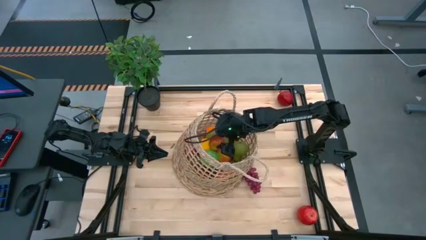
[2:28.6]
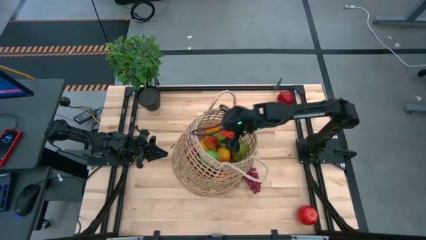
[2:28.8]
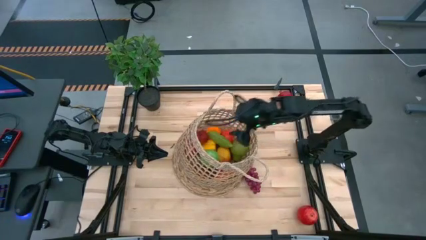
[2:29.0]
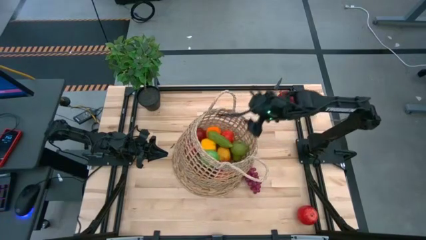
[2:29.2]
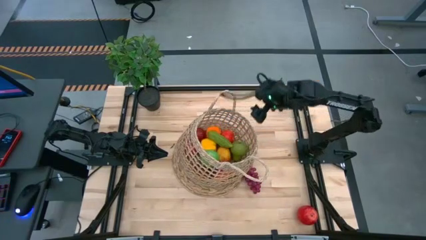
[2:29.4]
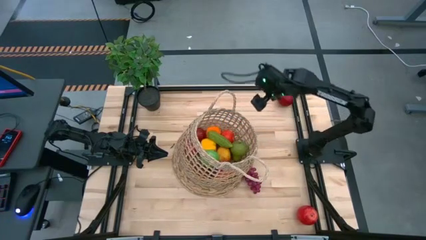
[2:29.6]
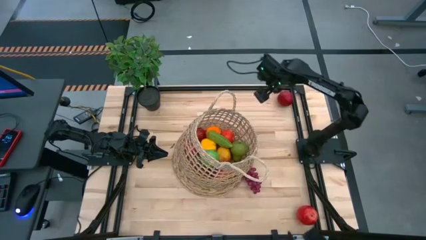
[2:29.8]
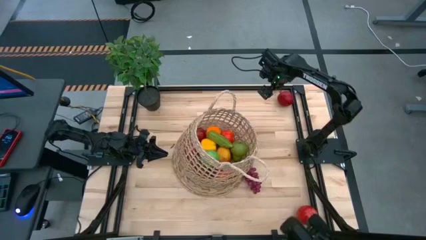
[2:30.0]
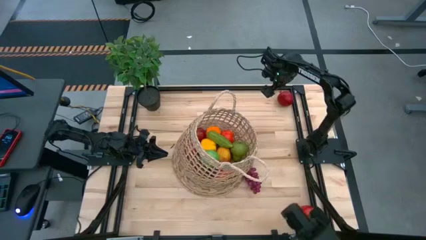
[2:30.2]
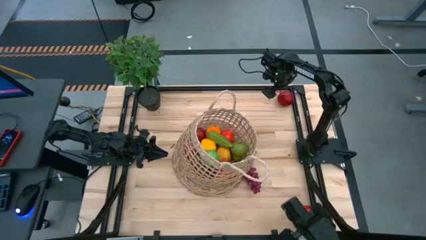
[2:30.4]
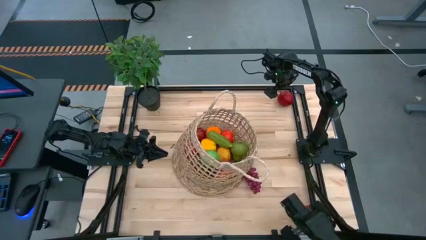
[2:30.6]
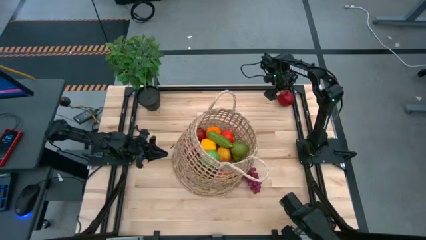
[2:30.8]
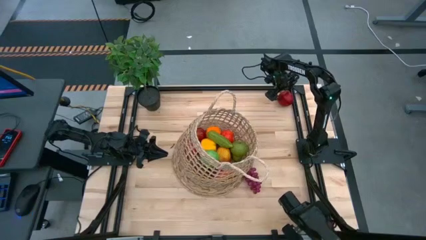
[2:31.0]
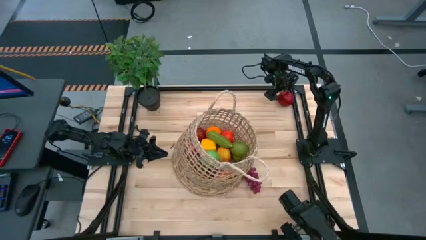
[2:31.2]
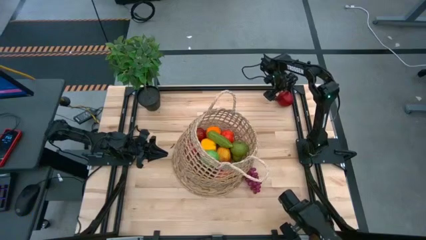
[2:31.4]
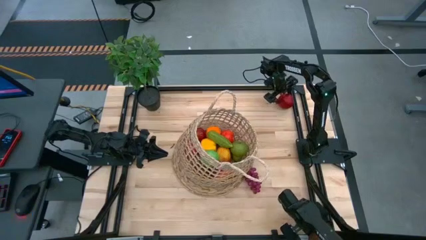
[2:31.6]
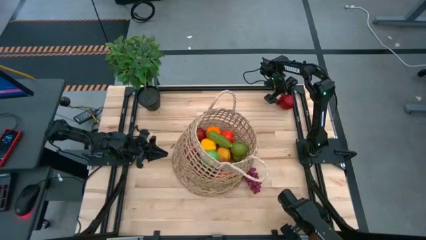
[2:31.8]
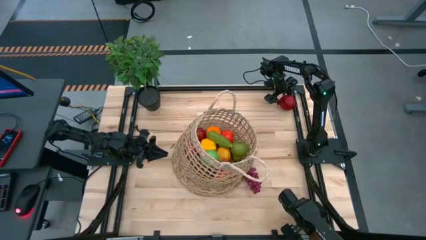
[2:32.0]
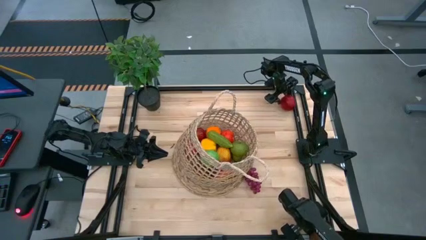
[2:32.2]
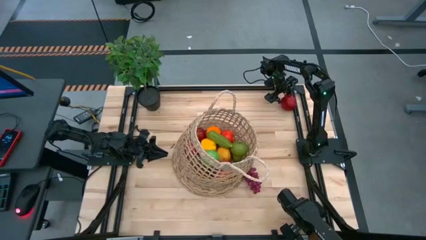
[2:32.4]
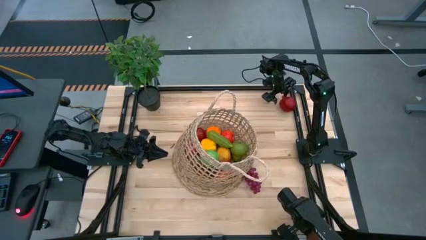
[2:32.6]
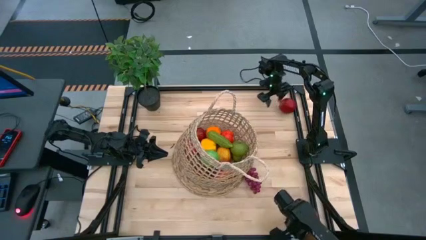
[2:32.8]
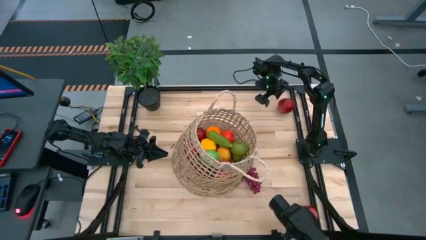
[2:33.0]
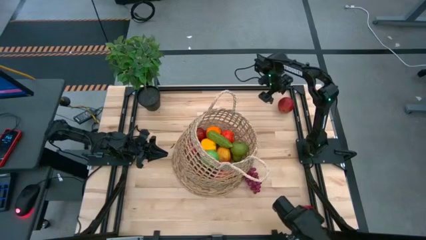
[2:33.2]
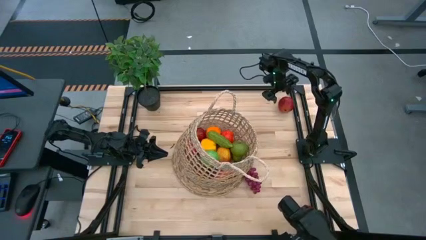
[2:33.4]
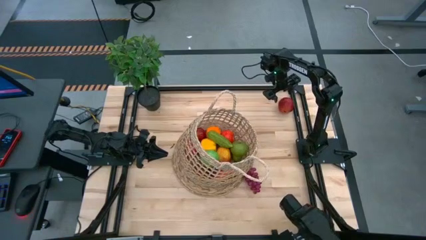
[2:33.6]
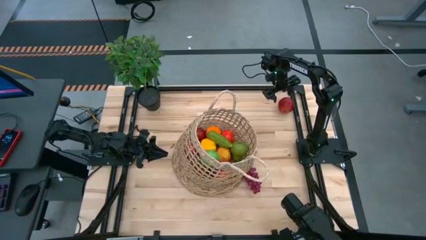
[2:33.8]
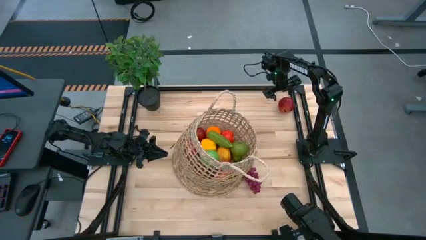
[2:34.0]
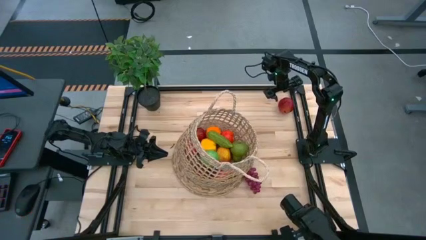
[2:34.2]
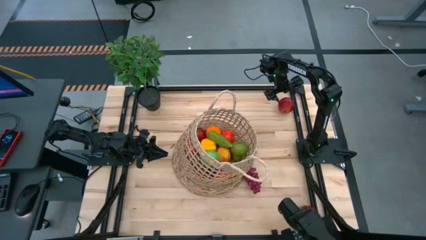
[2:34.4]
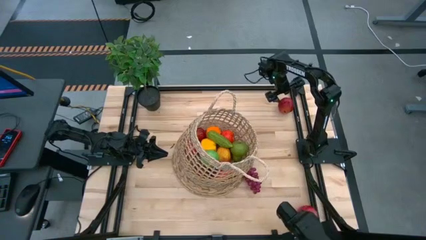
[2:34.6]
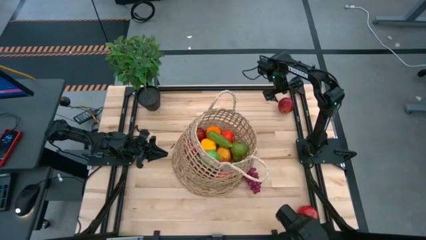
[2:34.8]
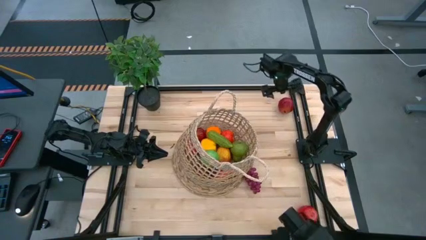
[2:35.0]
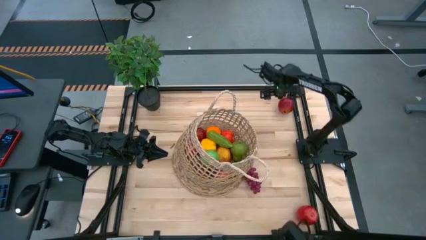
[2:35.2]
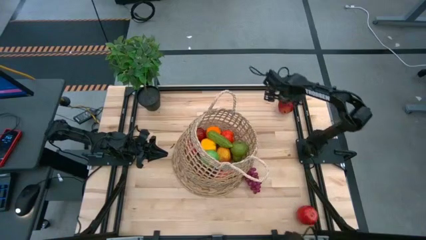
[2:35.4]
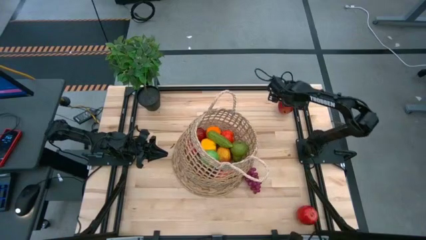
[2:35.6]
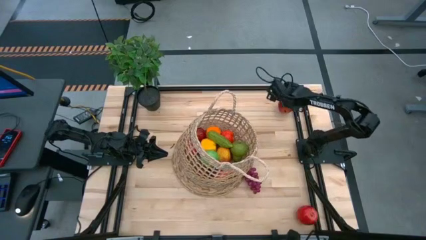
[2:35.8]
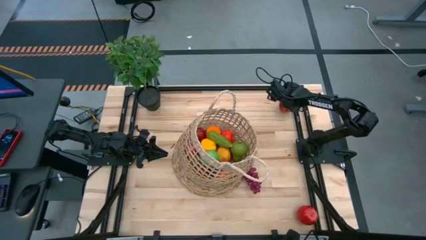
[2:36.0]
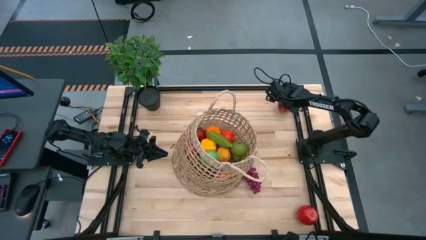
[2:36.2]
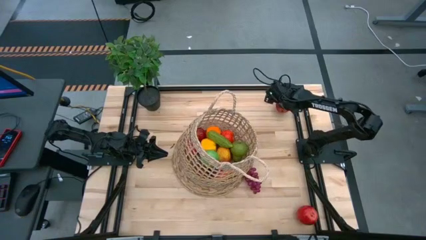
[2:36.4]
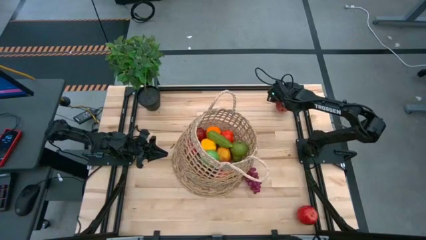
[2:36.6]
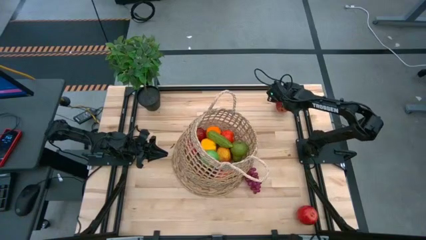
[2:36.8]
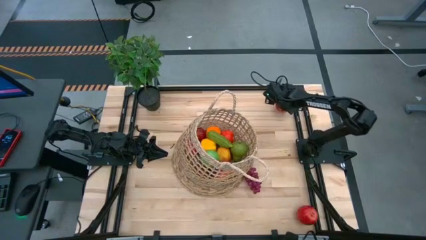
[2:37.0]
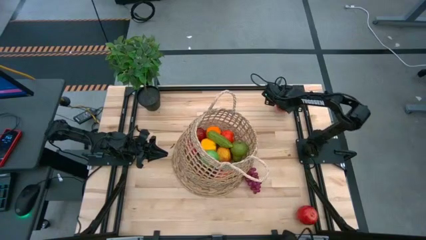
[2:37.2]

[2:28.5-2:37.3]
Task: Build produce basket
Put the red pomegranate into the brown basket

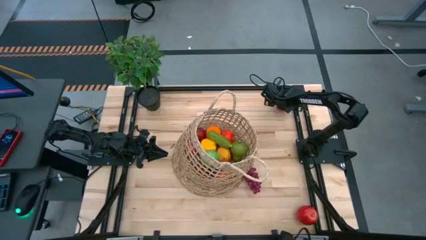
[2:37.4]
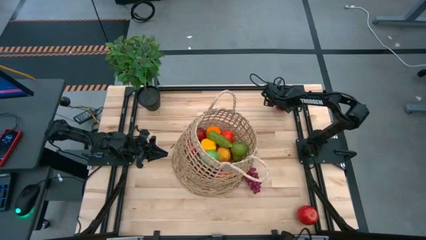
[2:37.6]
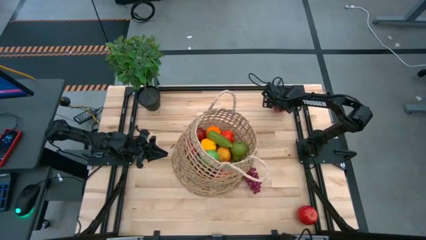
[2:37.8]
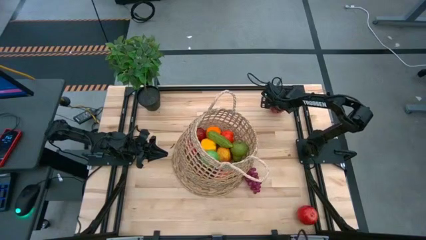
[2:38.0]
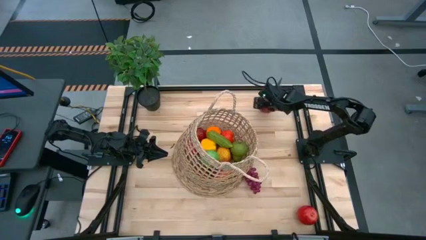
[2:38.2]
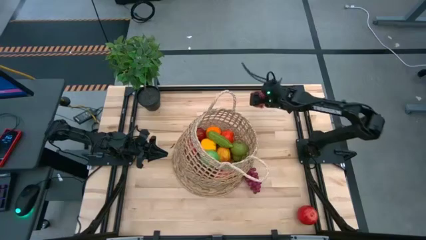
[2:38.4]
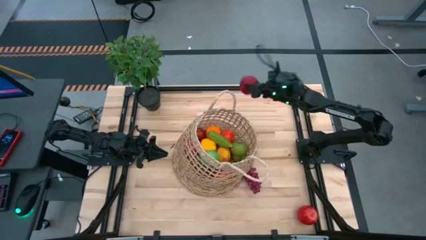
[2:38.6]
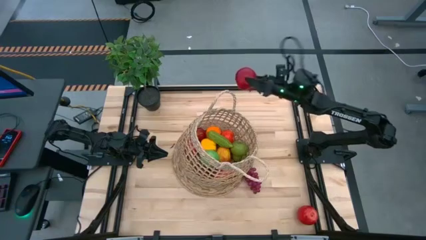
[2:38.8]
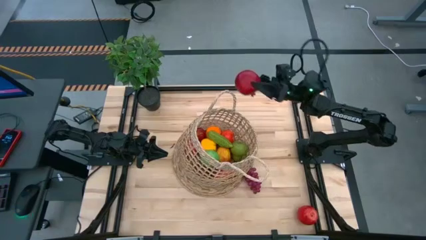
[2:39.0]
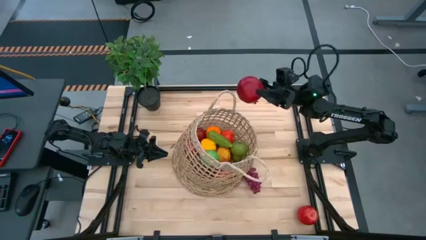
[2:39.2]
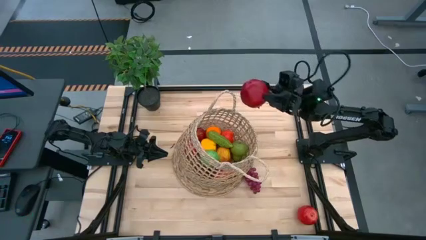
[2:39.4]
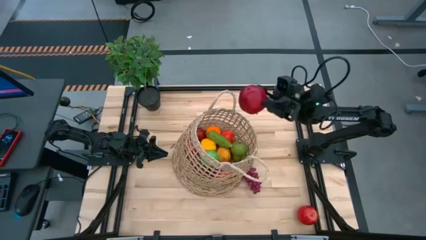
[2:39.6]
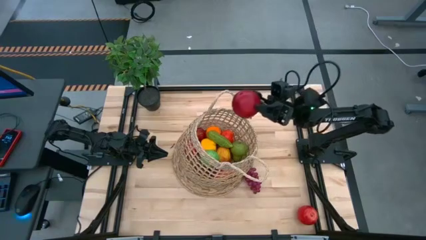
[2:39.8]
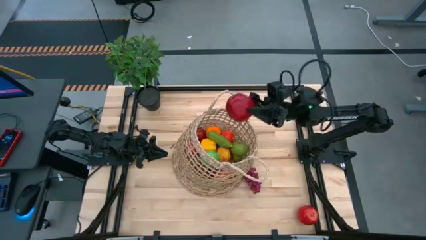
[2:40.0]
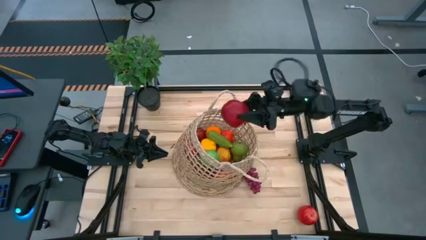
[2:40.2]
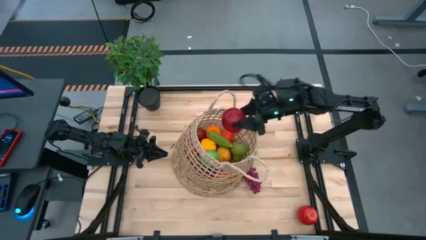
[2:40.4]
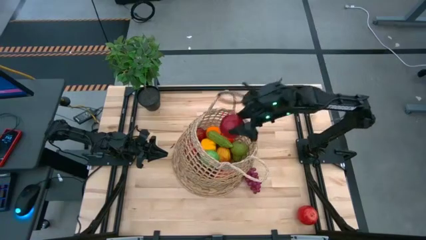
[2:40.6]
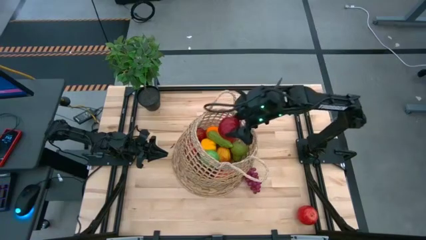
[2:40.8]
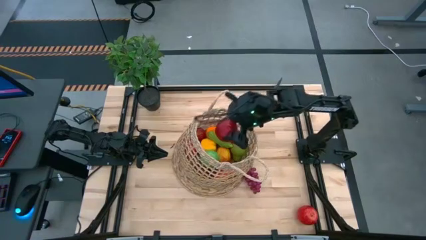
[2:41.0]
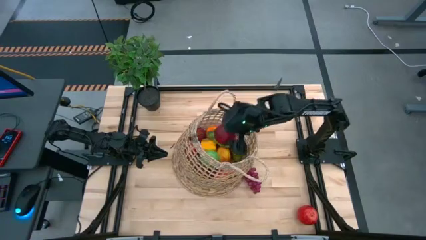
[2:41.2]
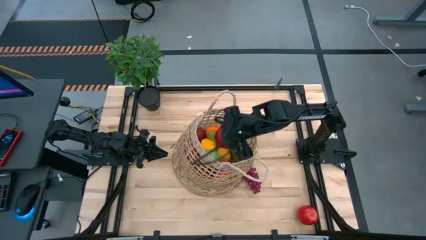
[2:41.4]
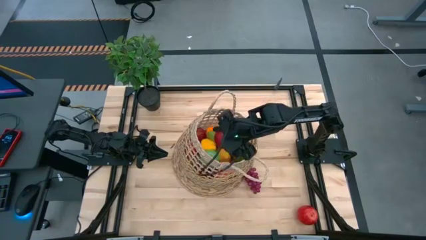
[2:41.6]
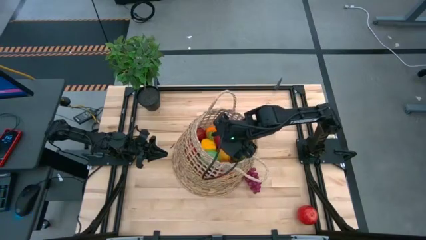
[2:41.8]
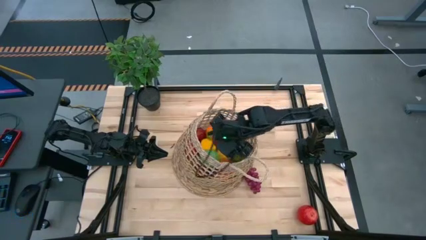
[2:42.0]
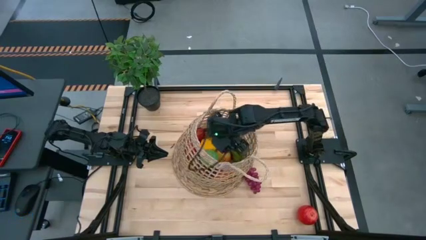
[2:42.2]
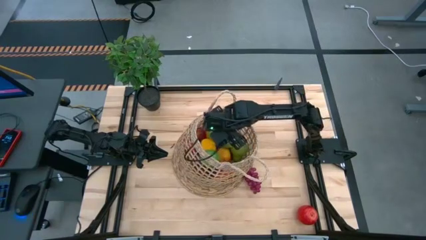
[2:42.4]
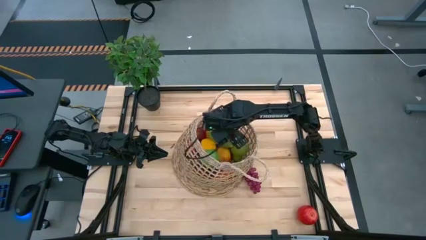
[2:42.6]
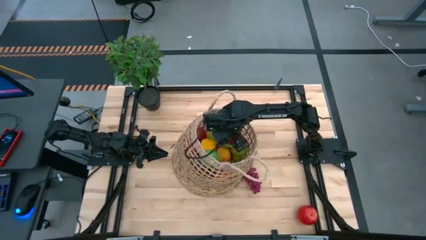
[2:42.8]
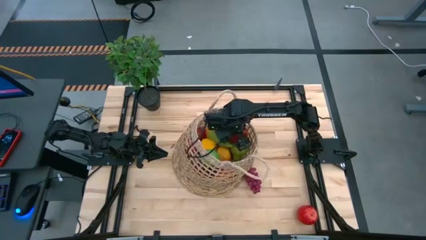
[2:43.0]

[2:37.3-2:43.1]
Put the red pomegranate into the brown basket

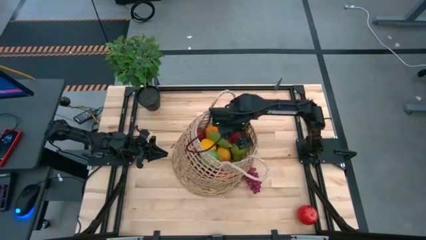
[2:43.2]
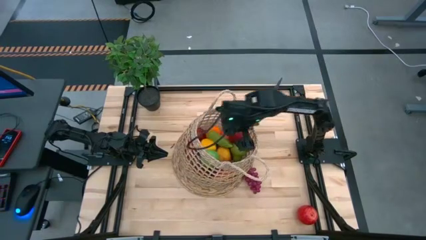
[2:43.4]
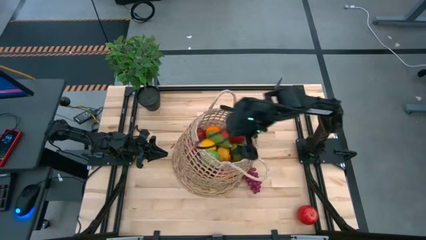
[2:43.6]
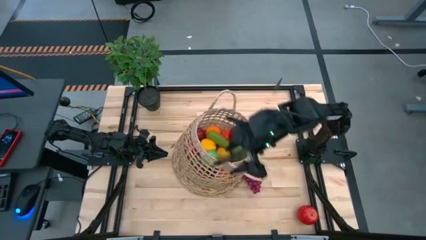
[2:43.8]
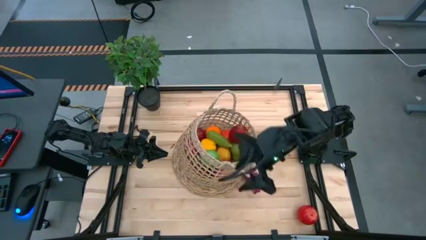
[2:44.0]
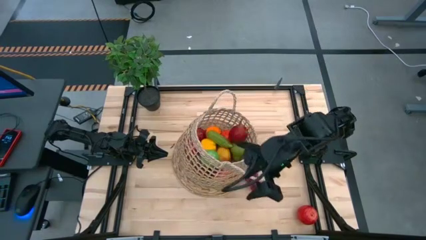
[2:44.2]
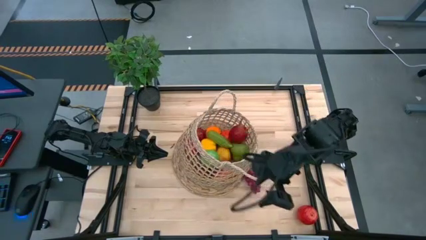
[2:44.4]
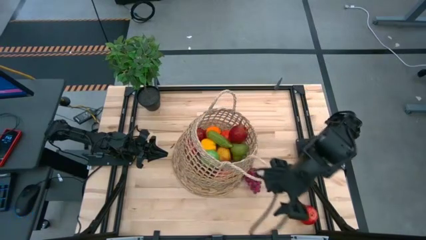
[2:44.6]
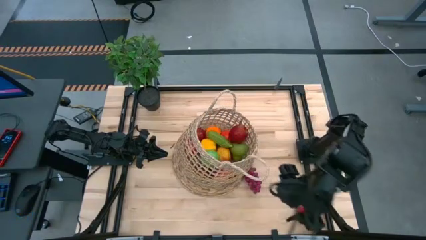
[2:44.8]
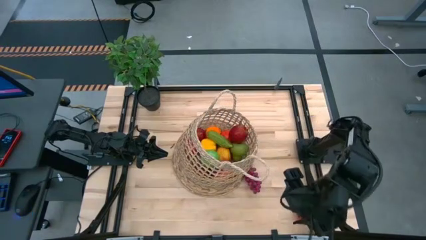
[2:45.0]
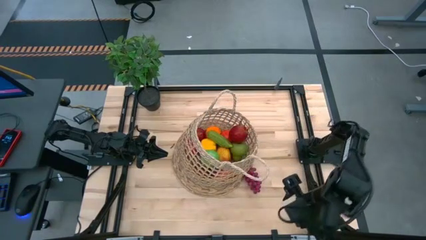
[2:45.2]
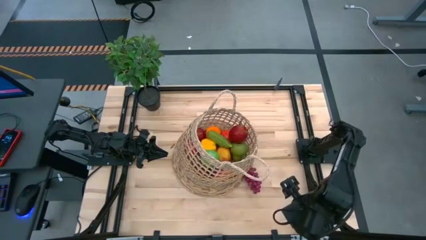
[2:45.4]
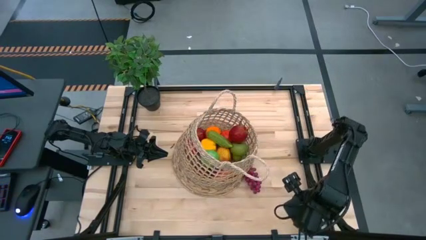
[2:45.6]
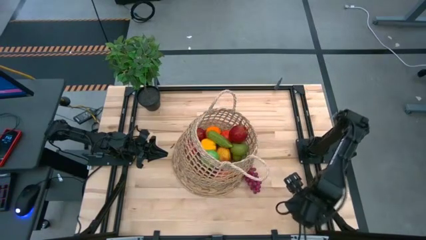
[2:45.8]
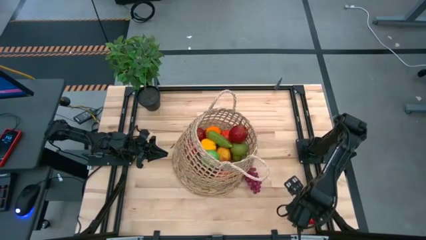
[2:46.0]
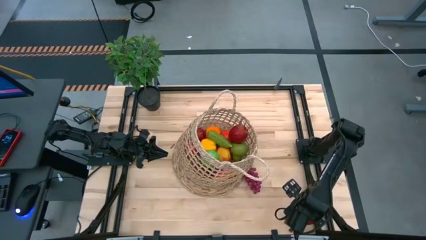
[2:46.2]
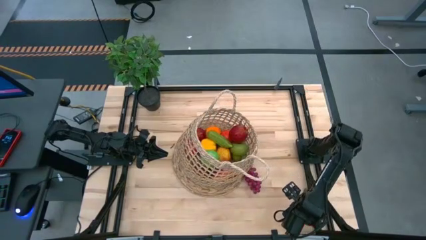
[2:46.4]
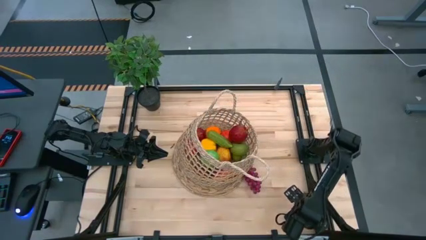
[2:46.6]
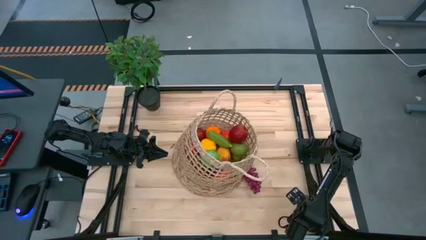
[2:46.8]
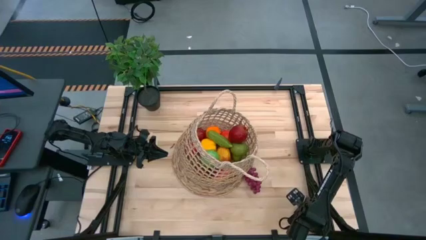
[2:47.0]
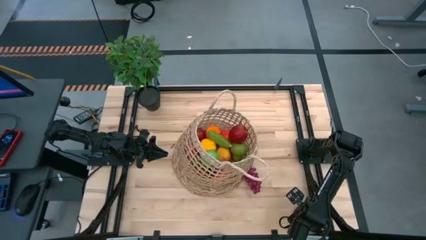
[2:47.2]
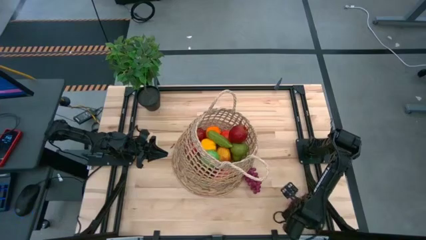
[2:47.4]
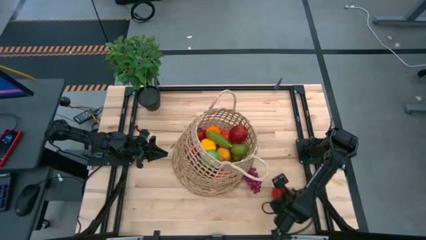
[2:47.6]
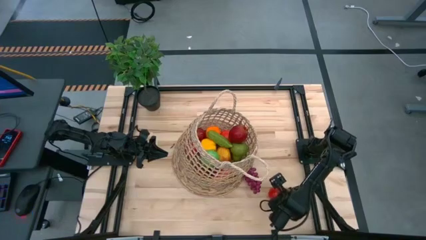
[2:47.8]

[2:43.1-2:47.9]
Put the red apple into the brown basket
